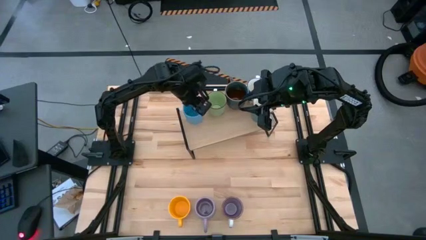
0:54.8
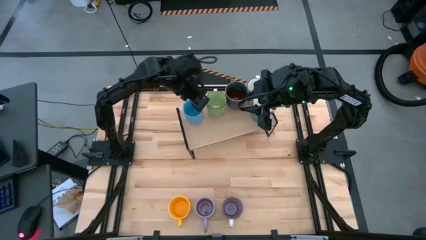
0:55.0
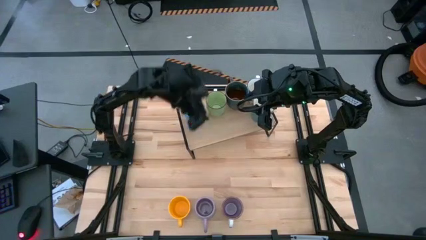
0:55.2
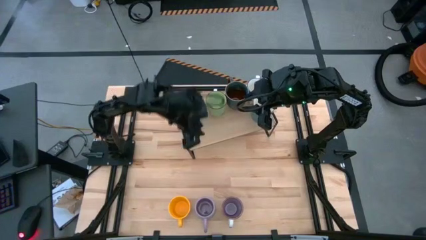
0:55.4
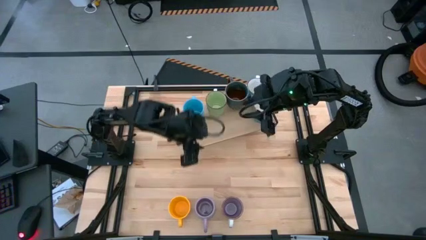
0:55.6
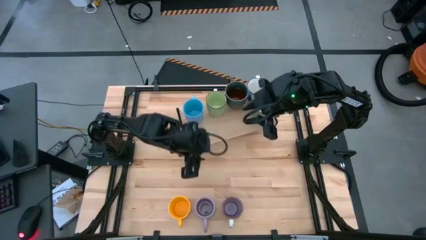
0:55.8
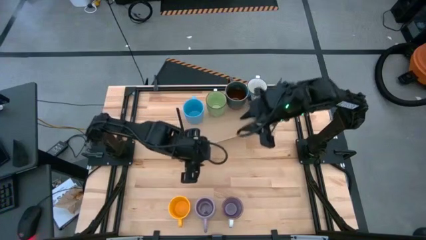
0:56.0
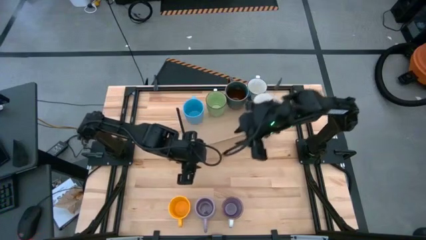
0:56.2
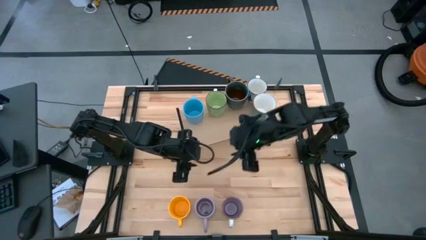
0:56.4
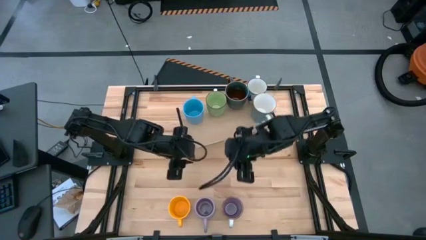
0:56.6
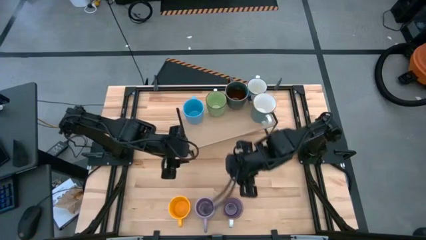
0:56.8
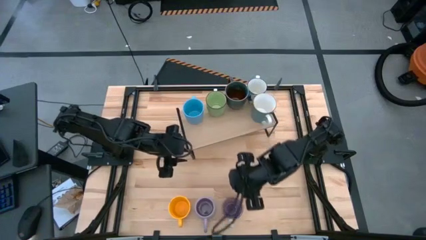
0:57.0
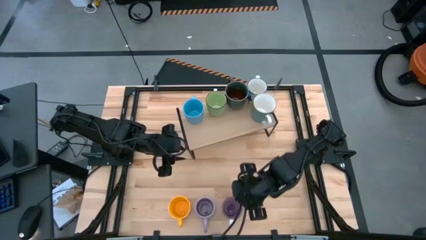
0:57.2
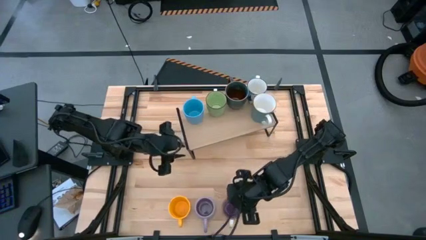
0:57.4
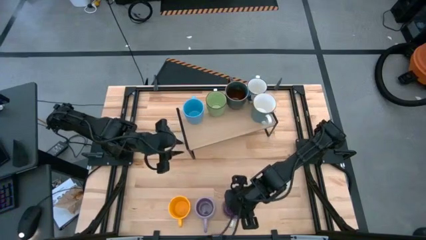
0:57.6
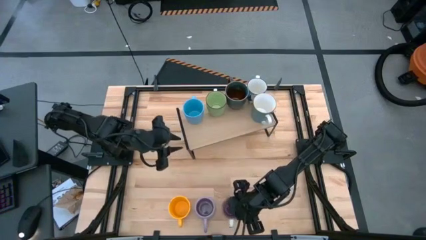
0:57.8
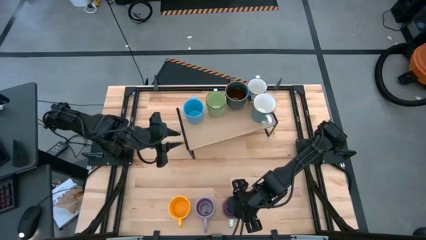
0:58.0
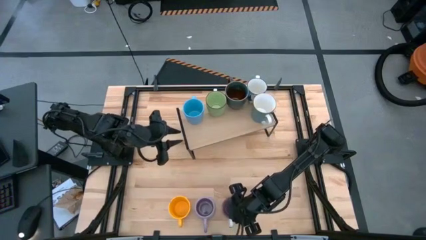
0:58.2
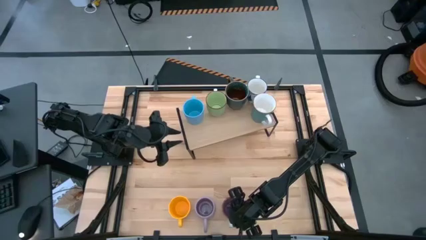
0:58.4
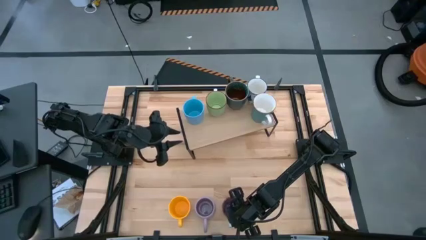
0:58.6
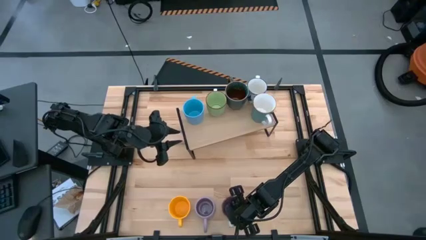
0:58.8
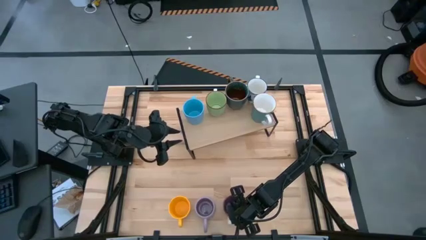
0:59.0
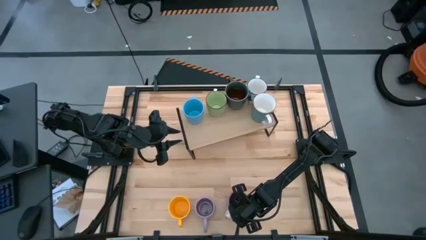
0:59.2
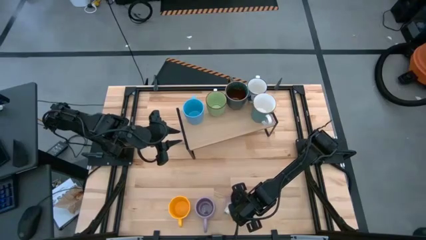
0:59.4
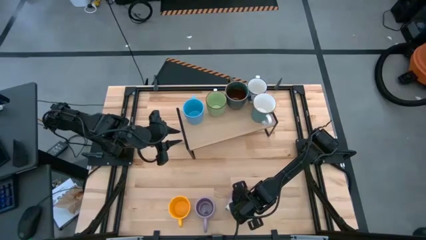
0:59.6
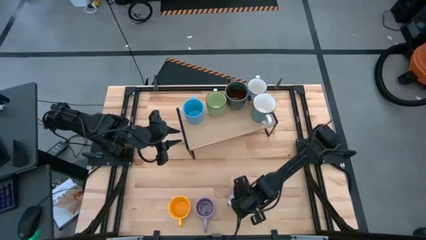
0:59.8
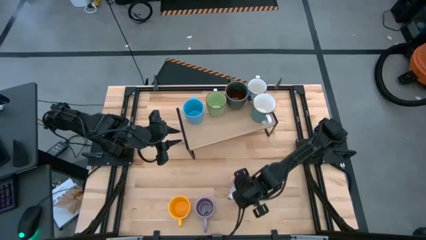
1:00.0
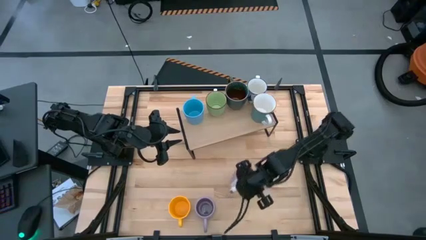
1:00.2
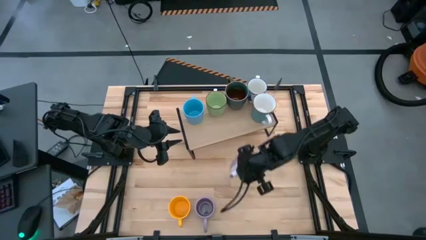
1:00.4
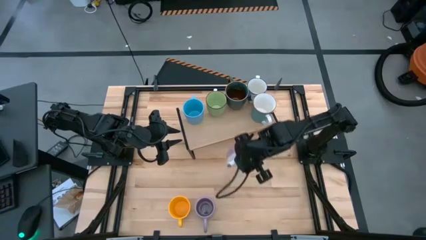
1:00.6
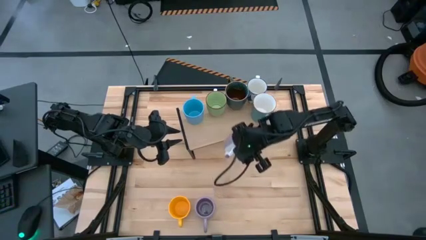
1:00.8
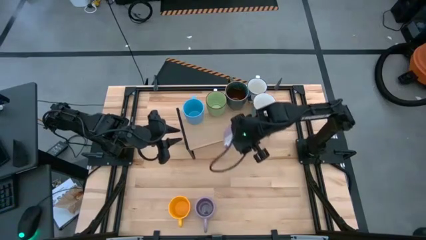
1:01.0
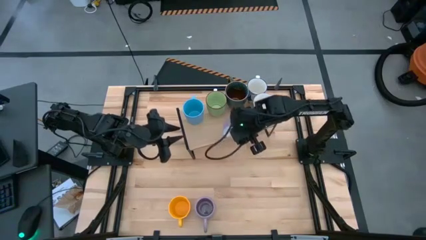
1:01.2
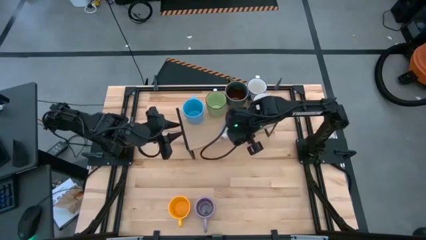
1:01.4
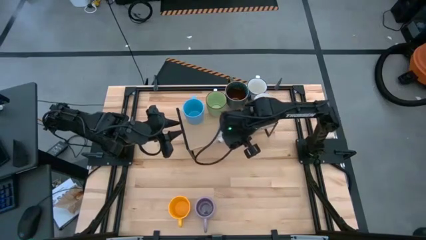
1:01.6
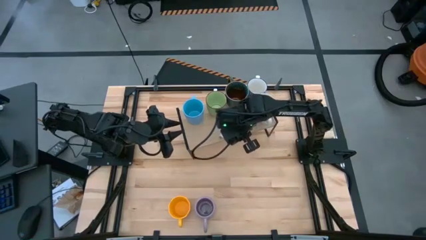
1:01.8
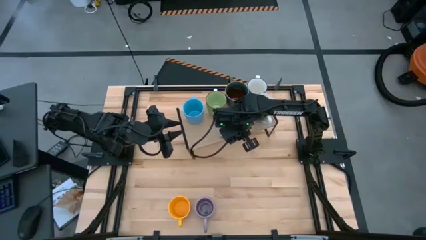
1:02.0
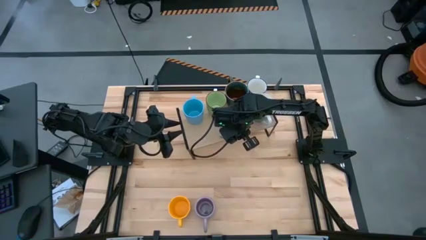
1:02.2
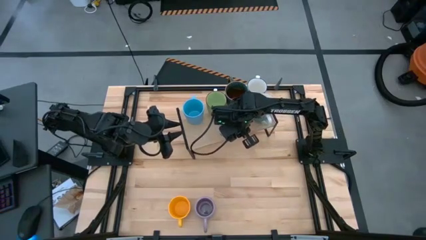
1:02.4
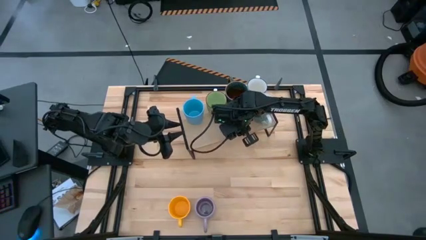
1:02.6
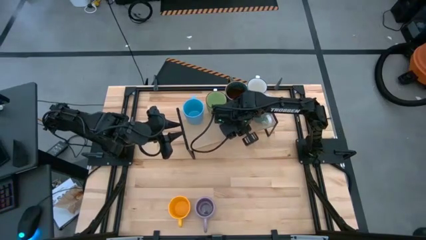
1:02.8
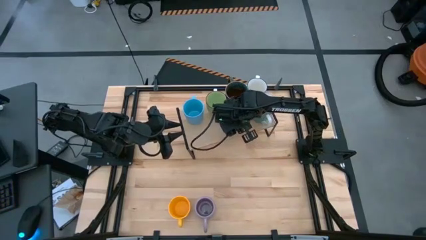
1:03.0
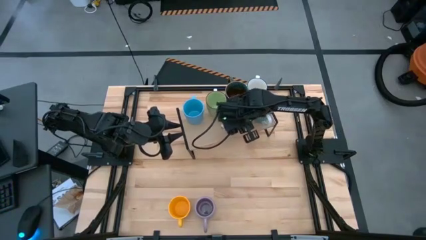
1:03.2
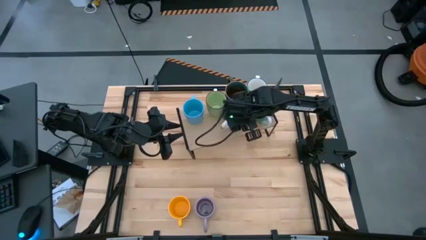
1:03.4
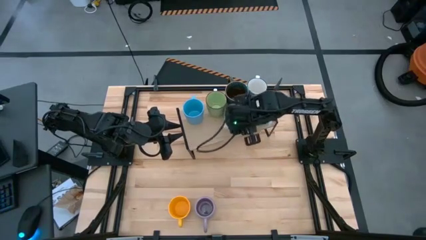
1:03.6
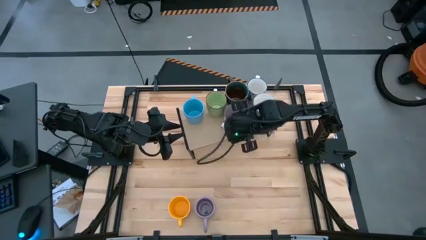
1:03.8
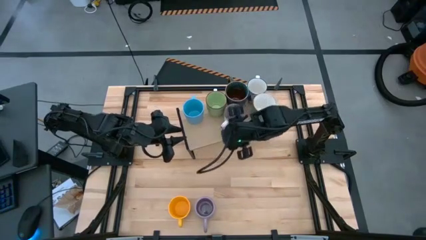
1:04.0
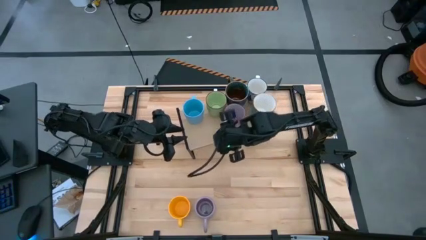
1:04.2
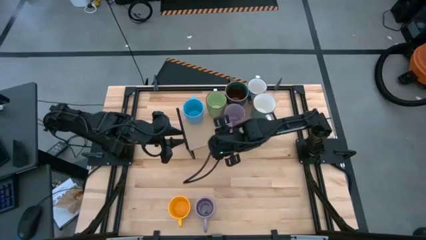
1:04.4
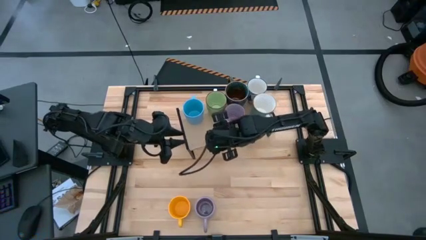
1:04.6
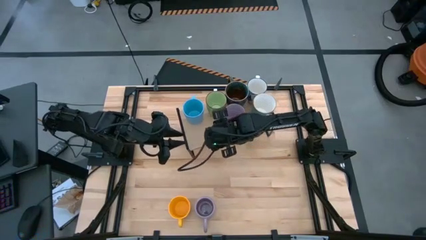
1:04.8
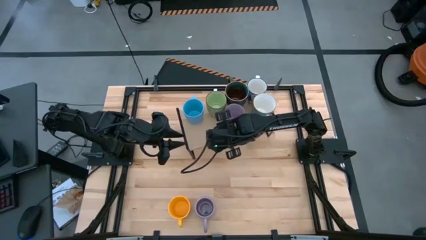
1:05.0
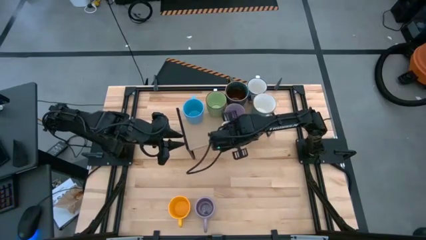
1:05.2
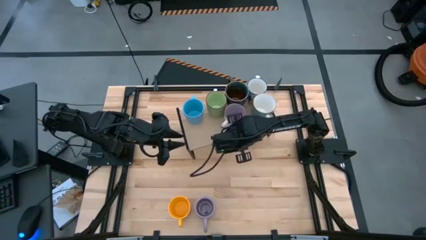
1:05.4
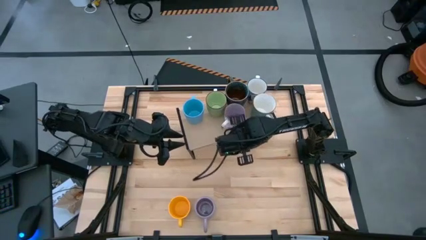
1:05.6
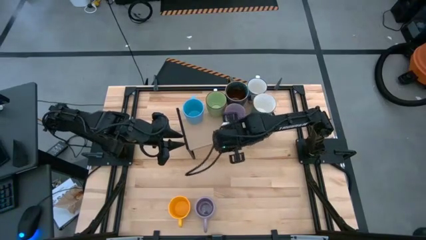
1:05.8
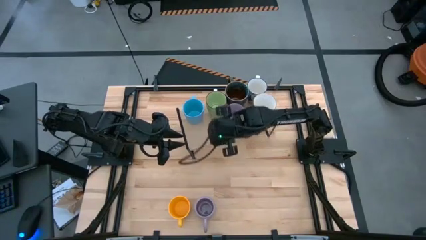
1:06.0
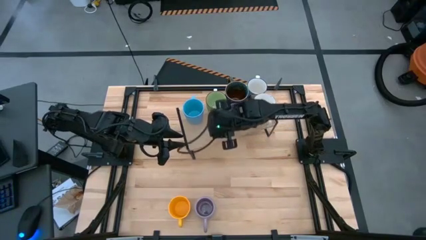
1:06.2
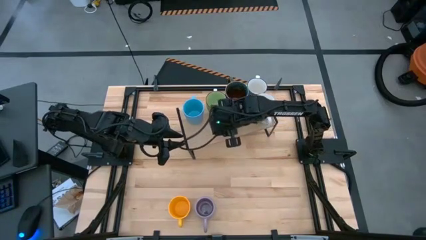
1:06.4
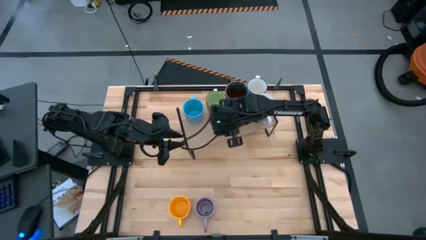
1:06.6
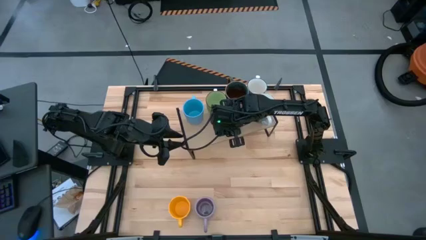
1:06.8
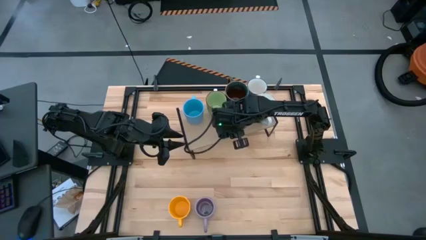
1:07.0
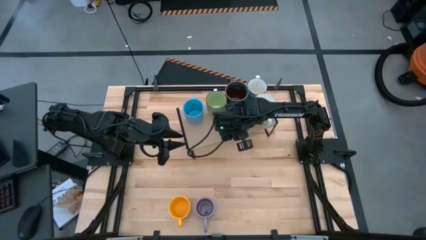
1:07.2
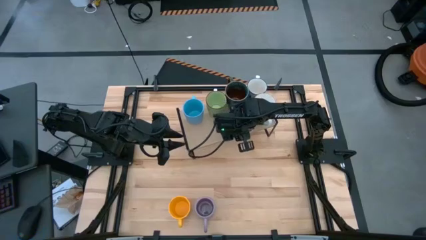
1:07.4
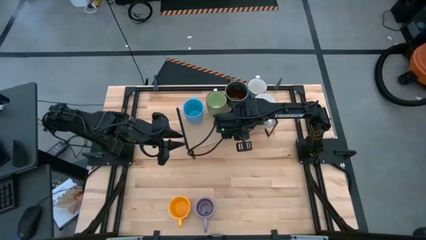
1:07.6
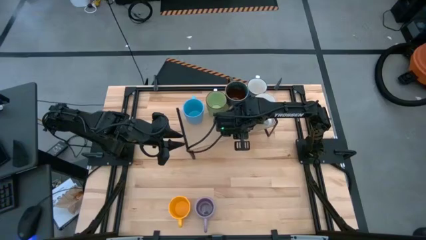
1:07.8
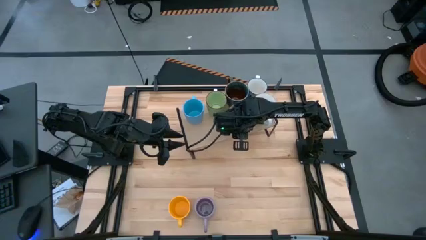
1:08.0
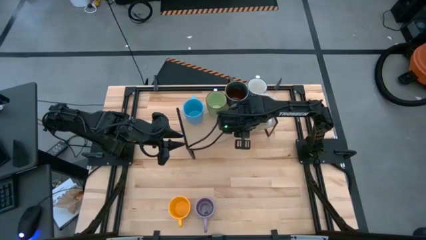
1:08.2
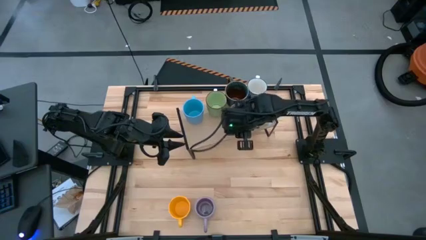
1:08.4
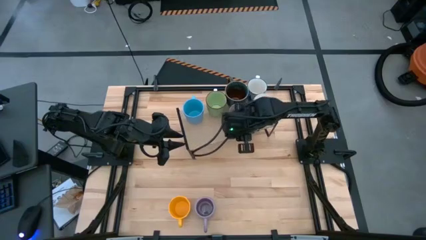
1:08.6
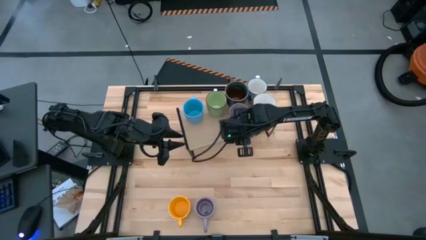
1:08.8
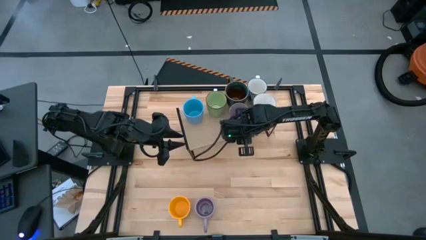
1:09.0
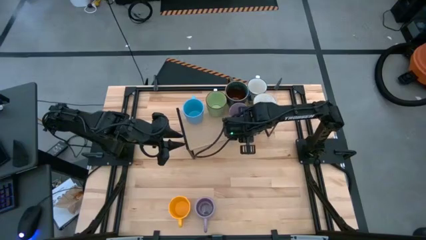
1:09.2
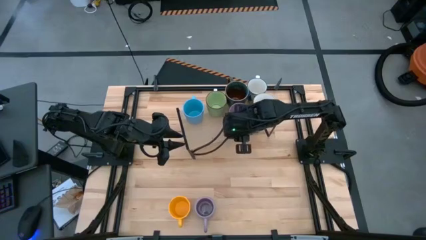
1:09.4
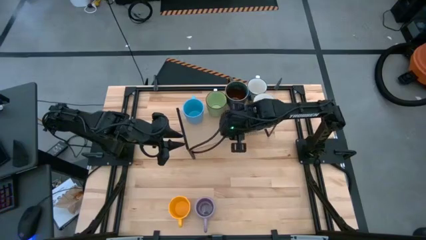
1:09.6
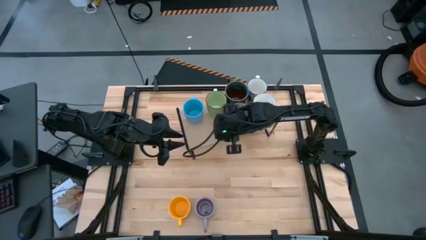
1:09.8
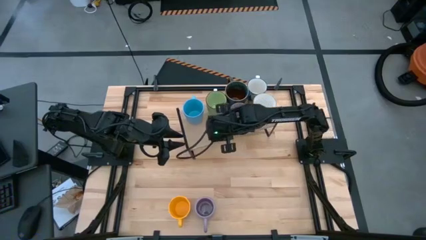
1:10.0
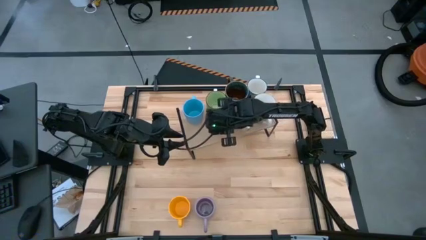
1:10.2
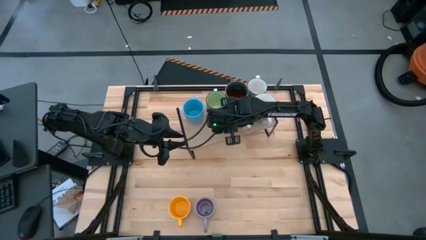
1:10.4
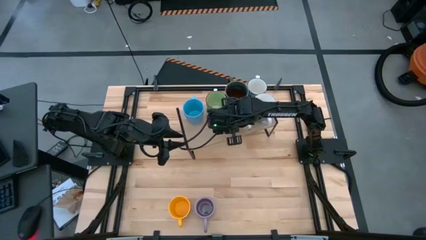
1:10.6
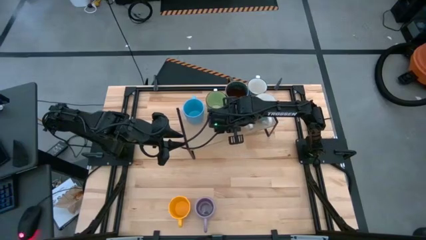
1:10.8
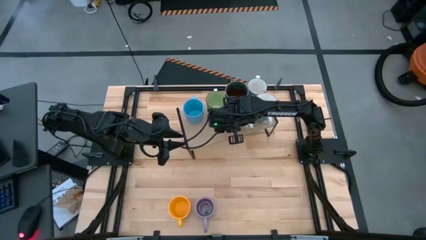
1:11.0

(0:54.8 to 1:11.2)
Task: Place coffee mugs
Put the right violet mug on the shelf
